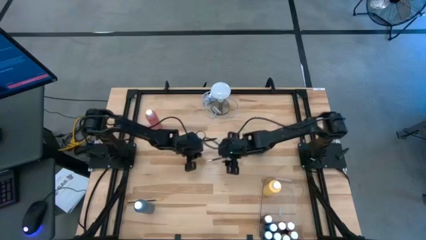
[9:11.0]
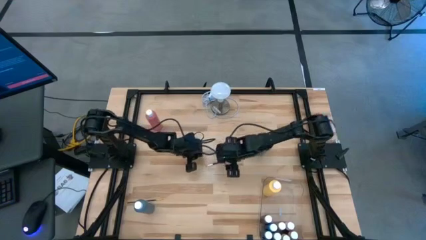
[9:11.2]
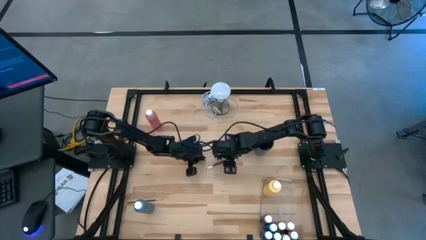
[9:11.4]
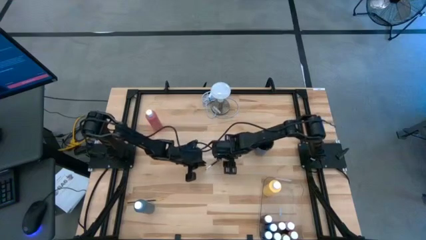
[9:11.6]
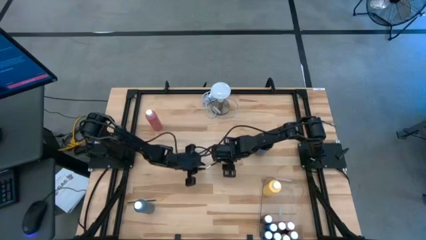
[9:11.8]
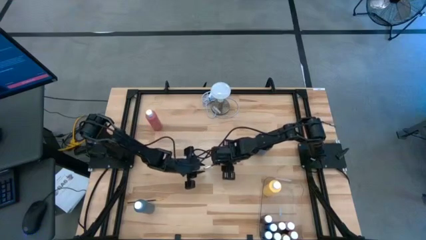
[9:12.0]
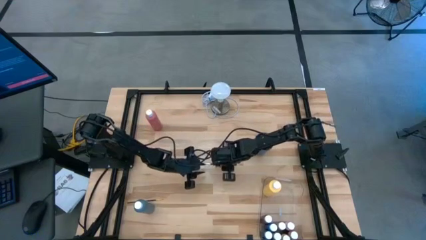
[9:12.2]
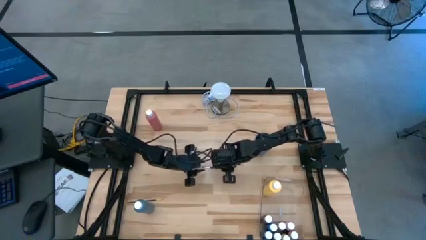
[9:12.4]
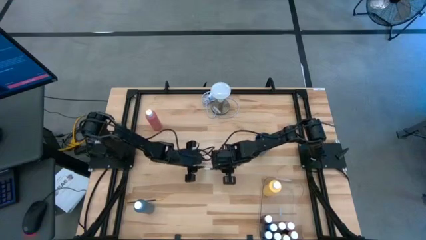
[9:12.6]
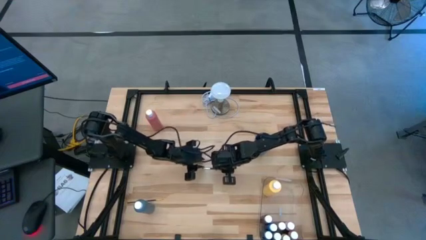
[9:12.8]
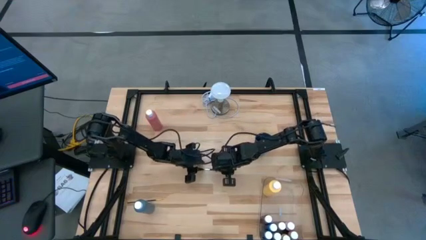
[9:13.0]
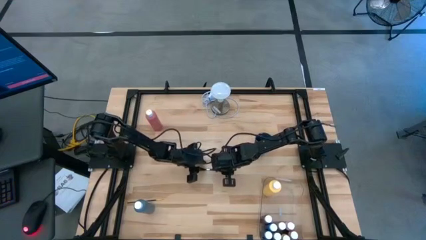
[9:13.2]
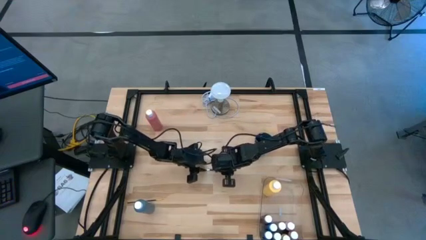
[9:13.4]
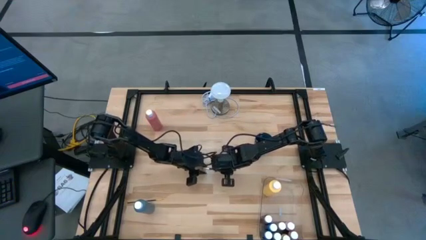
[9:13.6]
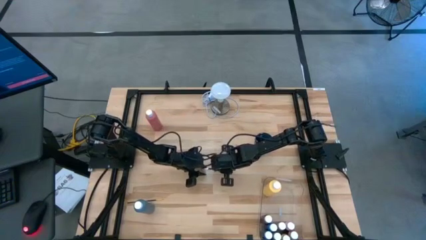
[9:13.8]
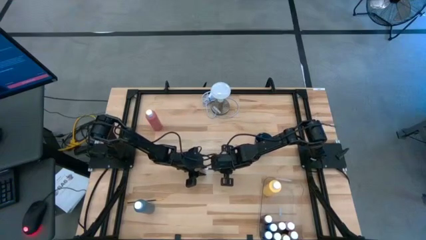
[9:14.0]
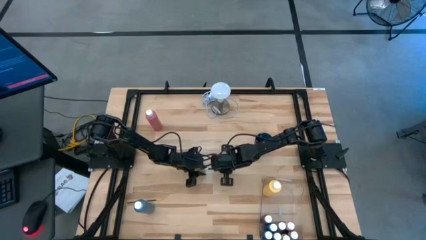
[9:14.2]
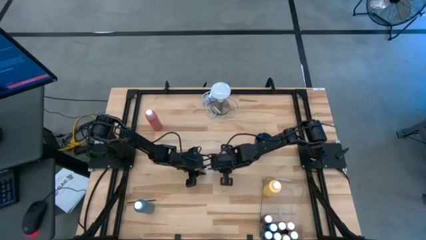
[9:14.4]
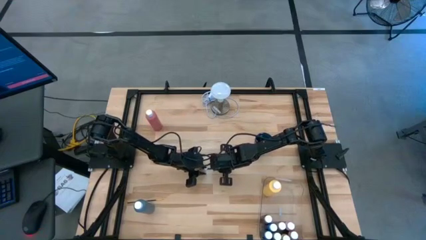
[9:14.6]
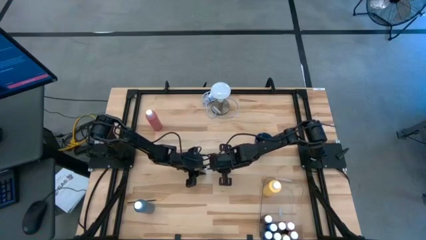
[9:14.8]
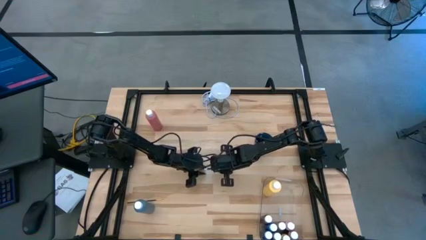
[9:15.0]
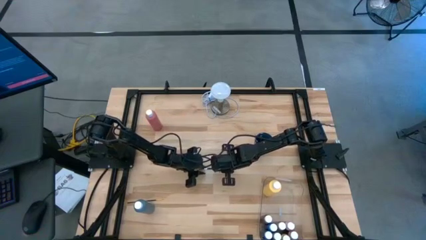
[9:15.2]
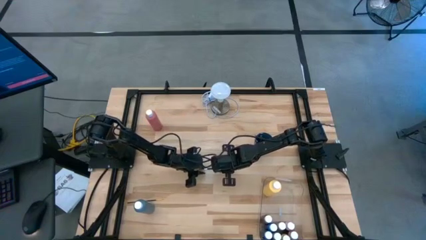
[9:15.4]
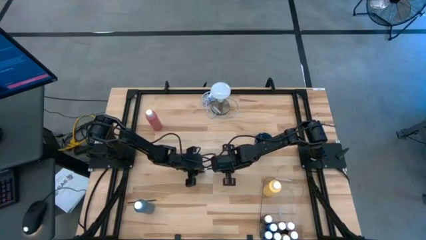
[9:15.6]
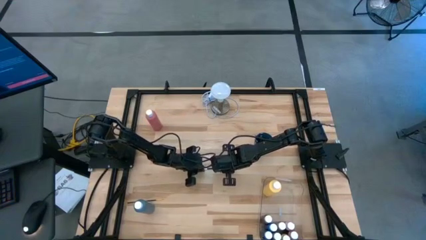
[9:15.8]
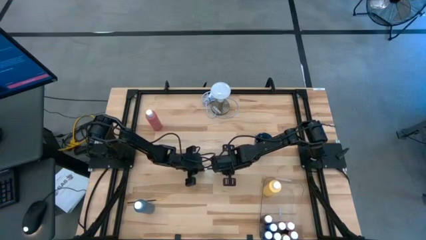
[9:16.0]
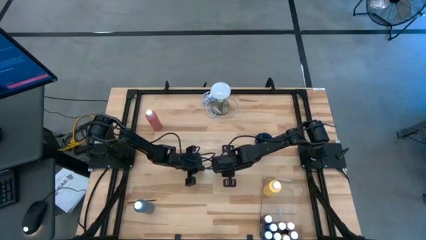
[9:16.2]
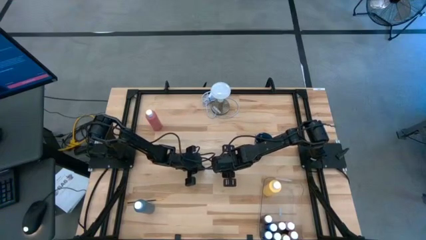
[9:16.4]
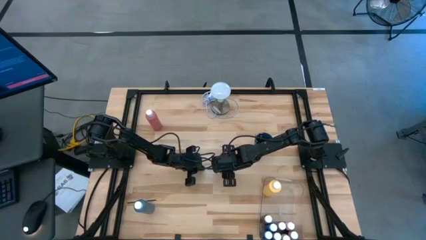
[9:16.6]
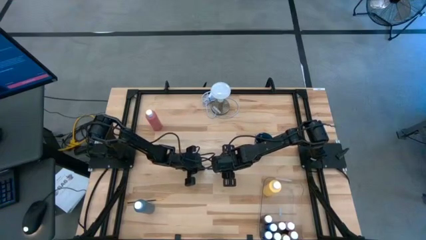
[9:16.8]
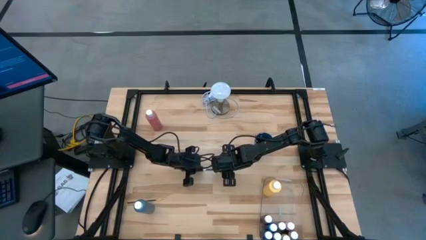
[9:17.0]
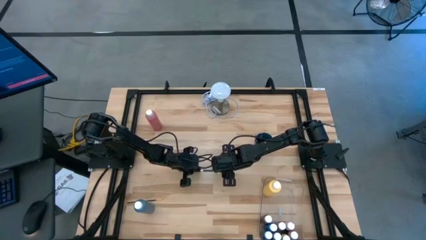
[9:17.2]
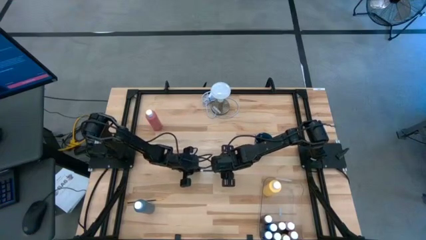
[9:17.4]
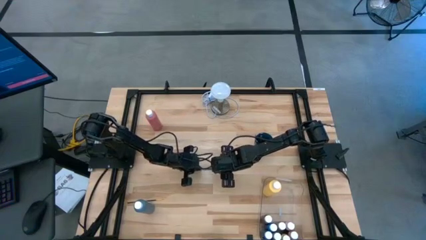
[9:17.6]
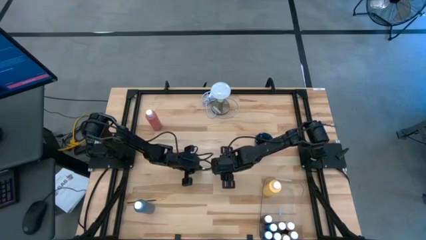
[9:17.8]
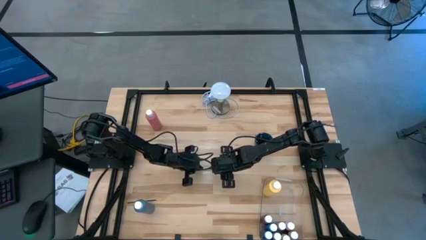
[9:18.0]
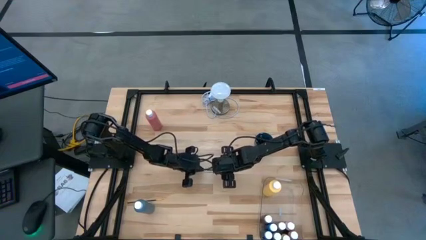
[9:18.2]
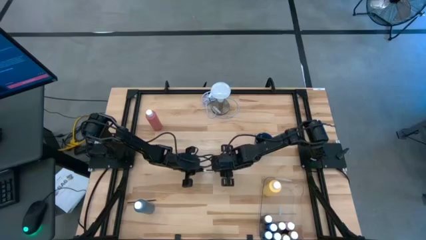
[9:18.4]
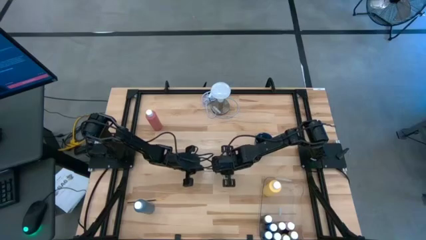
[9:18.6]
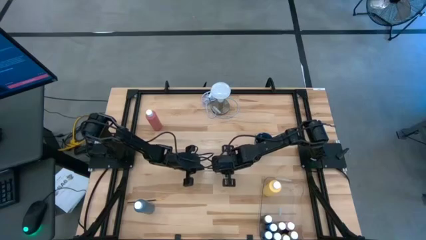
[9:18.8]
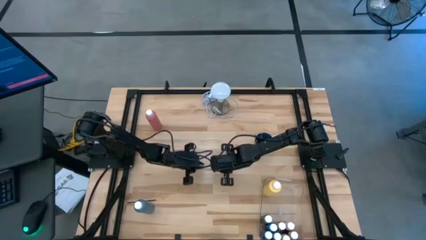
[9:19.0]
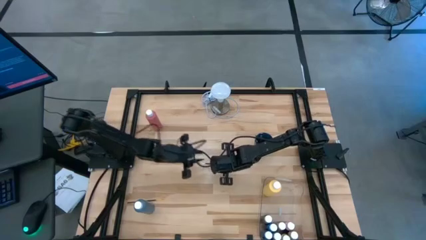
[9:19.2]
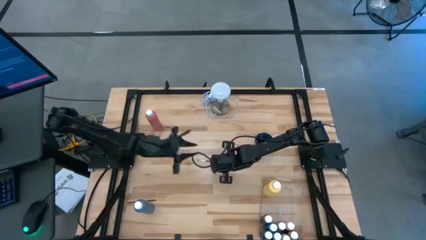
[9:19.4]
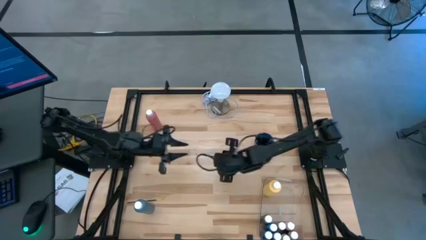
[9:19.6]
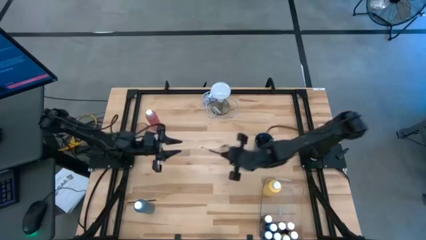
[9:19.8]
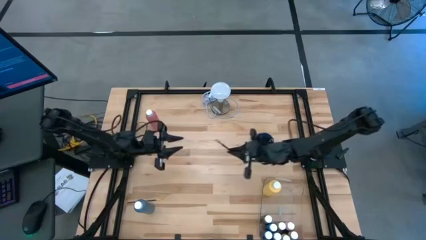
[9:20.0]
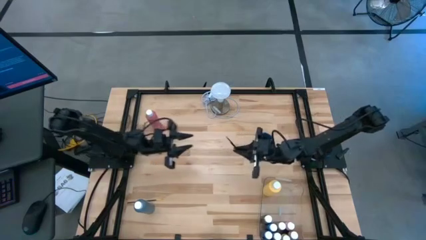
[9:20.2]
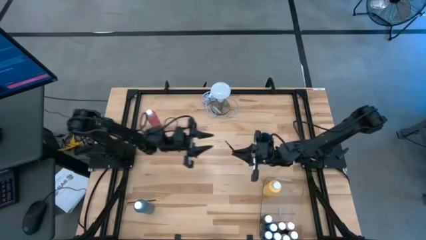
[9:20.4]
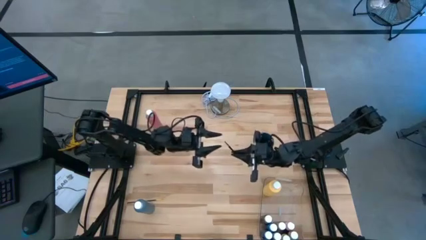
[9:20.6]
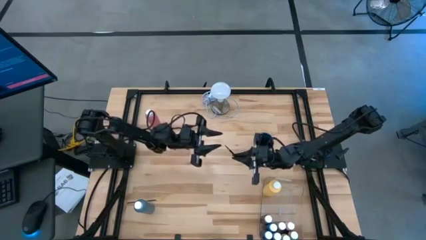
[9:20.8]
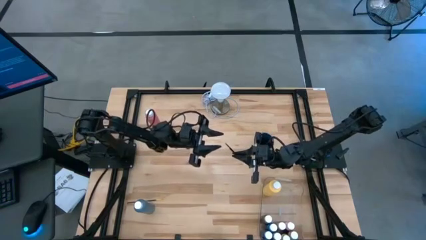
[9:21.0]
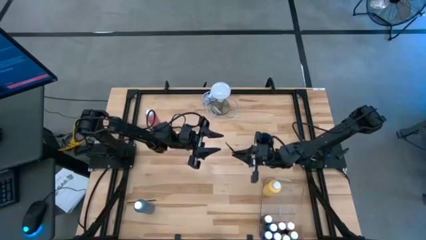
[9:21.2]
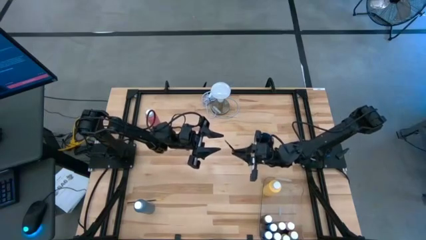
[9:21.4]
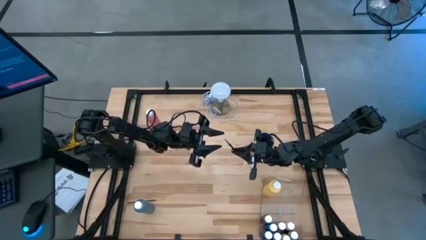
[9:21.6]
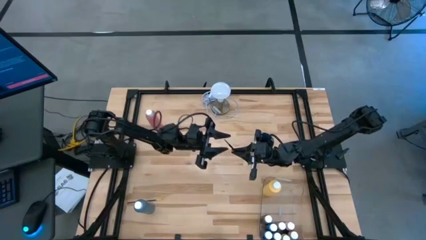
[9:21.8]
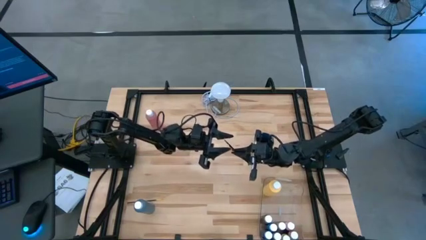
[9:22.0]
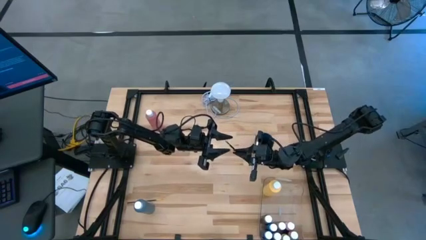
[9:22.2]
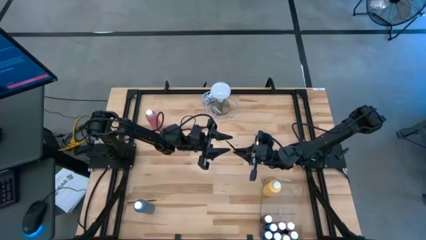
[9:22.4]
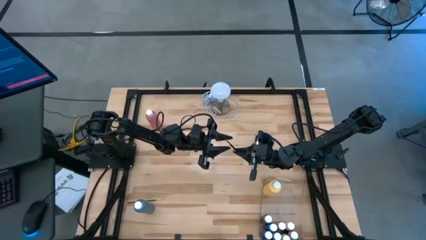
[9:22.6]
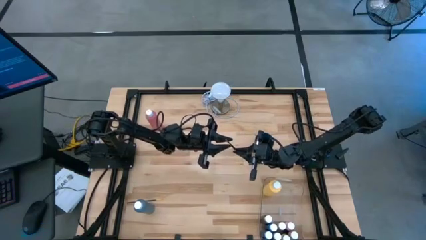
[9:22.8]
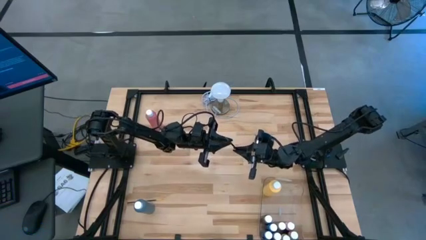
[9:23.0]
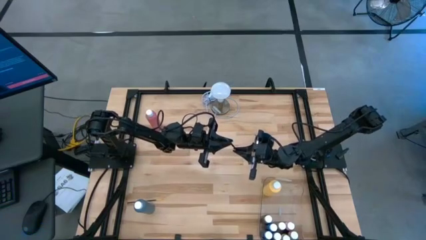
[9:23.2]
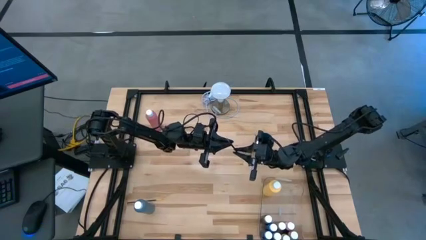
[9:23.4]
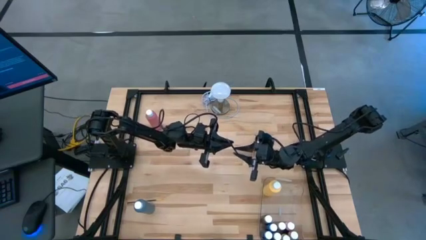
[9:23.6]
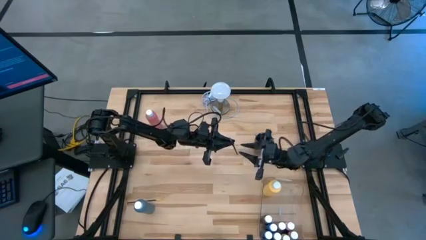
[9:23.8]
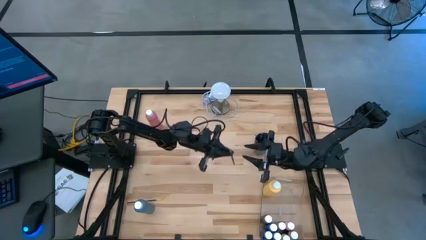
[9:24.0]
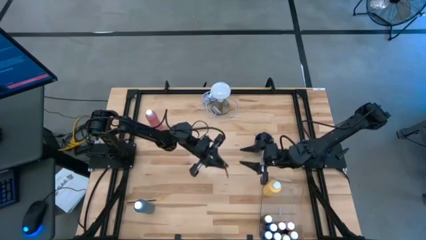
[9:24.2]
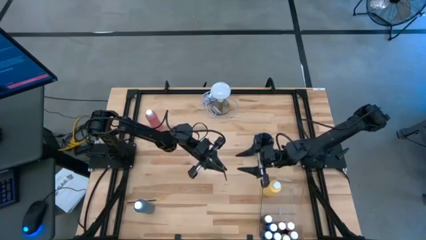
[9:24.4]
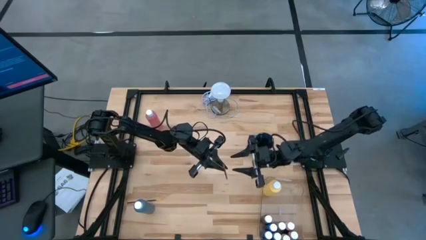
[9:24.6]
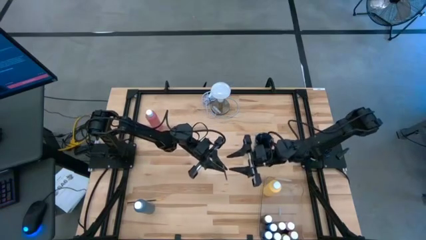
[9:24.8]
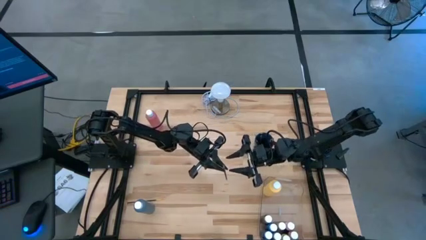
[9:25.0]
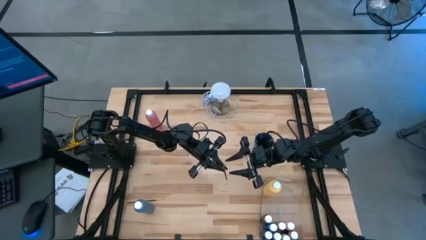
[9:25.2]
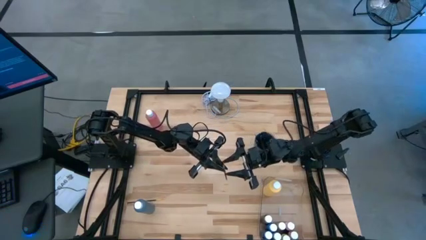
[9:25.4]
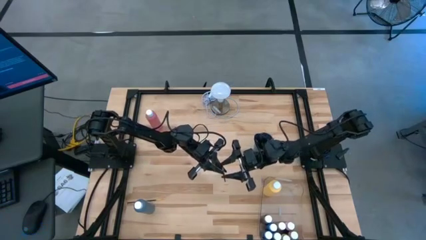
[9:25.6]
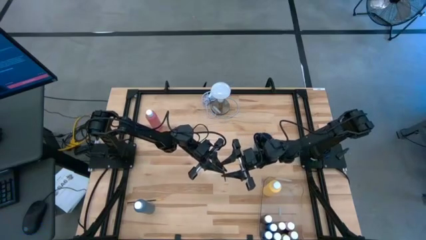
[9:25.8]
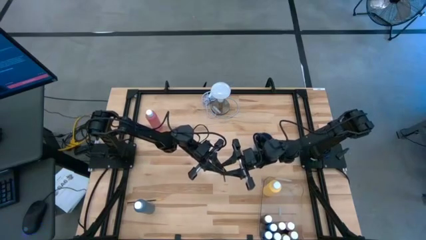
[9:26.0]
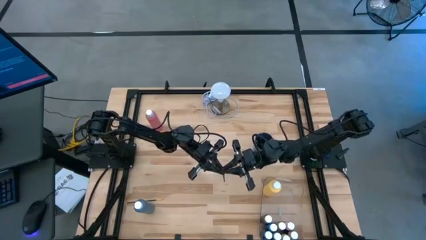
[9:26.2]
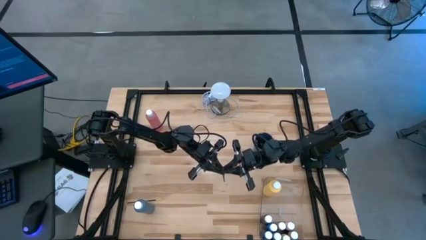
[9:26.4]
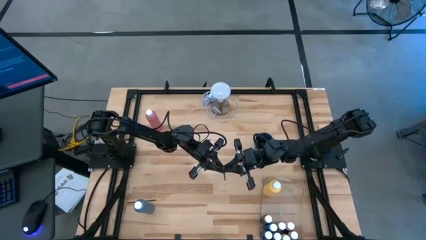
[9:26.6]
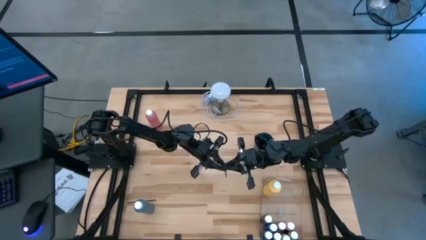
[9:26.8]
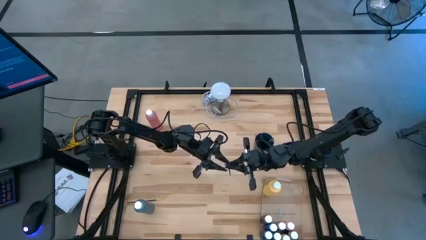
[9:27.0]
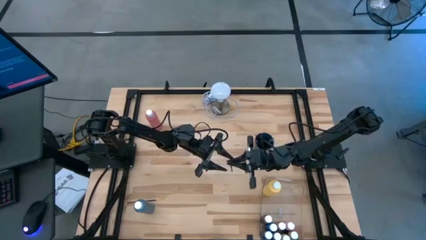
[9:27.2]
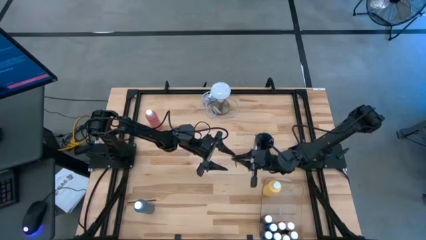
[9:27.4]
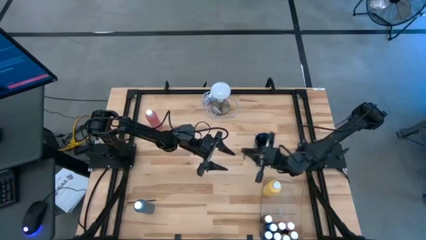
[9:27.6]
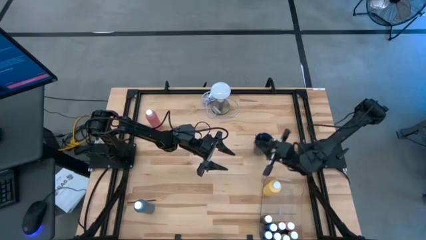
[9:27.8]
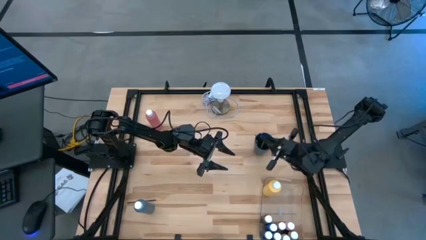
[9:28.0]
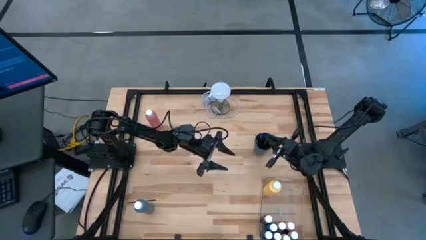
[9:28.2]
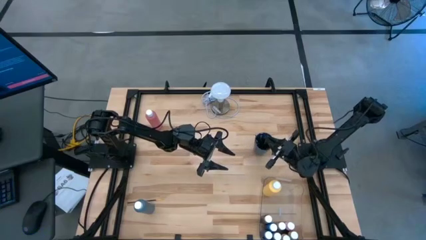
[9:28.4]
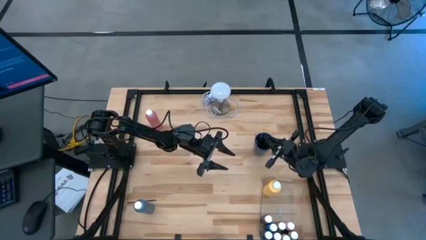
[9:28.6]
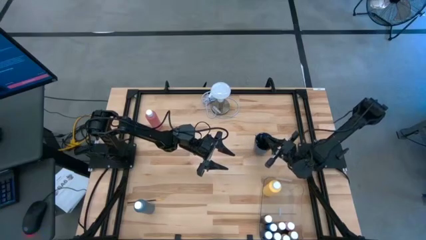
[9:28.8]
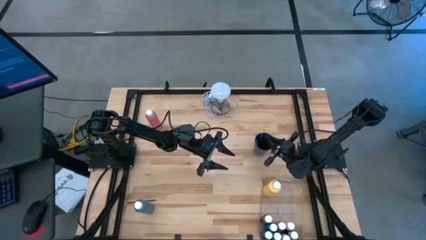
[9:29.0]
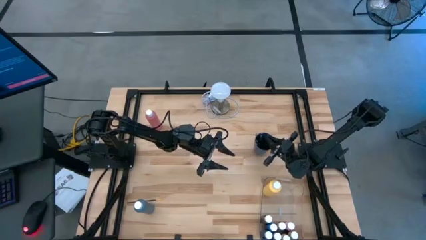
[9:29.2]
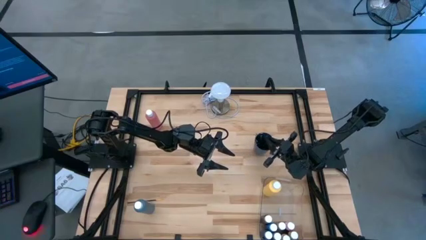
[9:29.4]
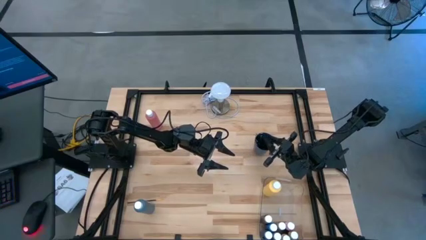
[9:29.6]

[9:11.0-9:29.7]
Task: Pick & Place Paint Supplies
Put the black silver paintbrush into the blue cup
